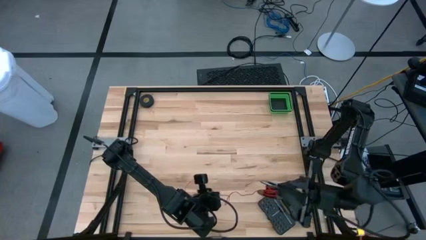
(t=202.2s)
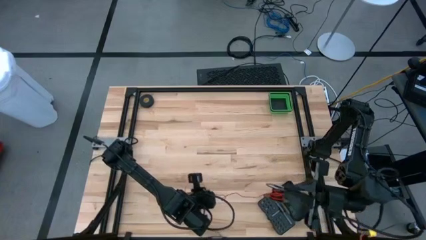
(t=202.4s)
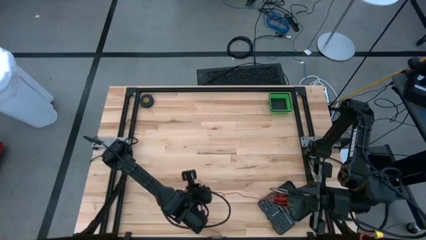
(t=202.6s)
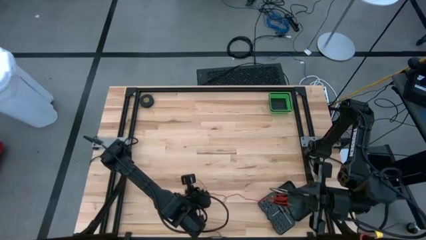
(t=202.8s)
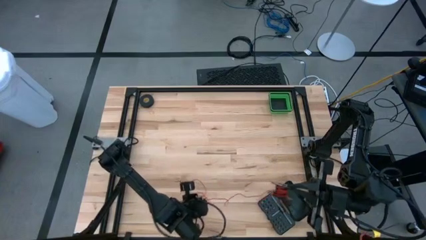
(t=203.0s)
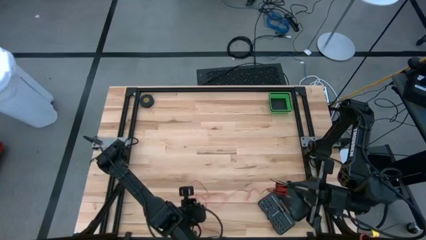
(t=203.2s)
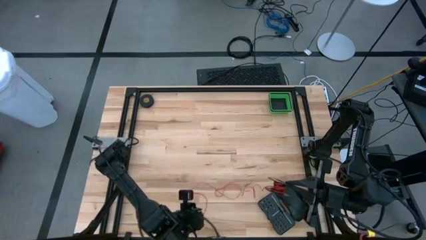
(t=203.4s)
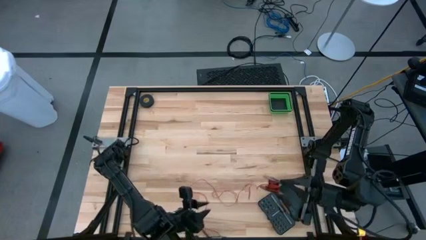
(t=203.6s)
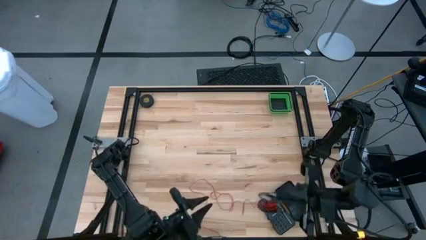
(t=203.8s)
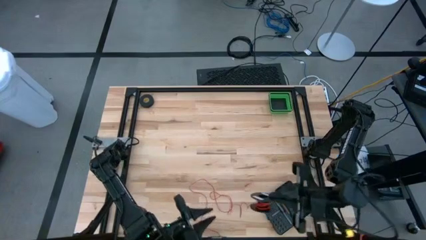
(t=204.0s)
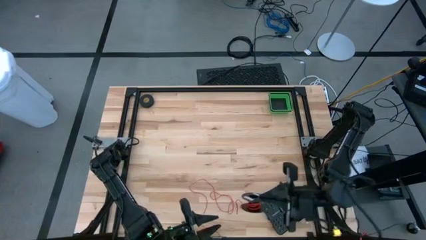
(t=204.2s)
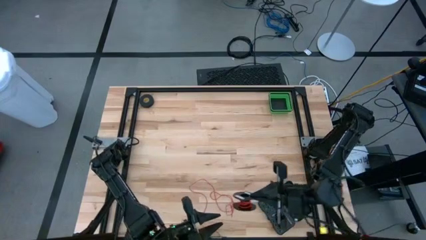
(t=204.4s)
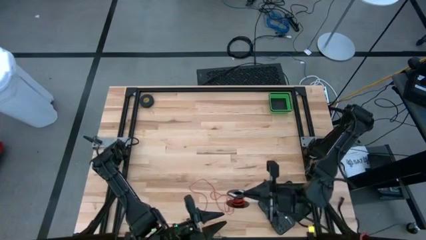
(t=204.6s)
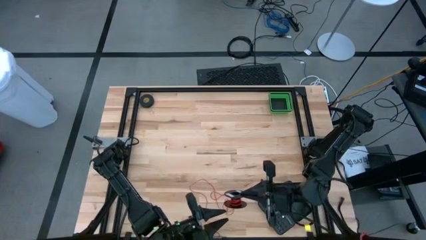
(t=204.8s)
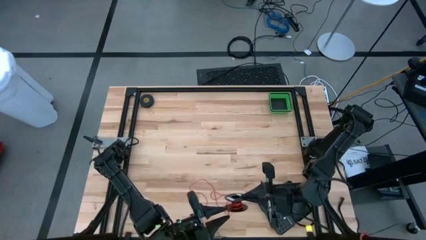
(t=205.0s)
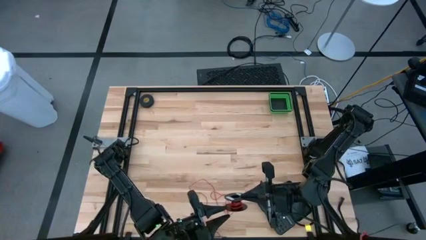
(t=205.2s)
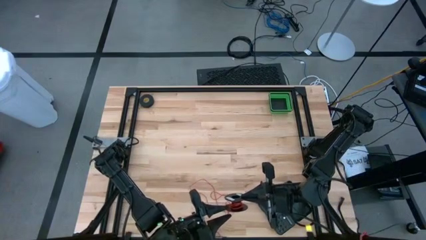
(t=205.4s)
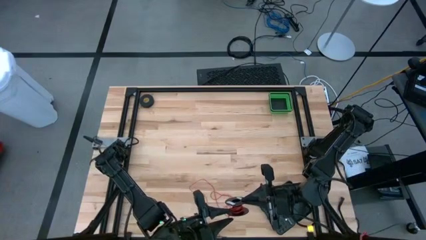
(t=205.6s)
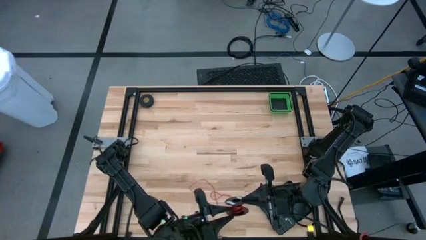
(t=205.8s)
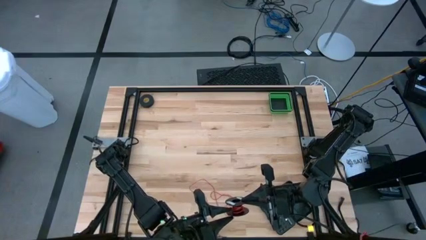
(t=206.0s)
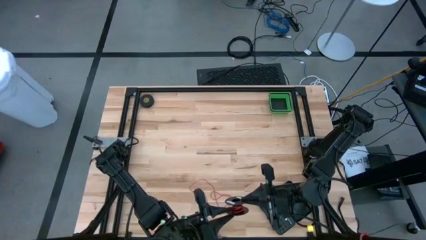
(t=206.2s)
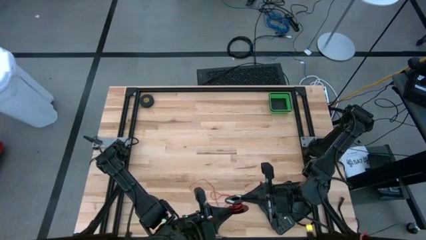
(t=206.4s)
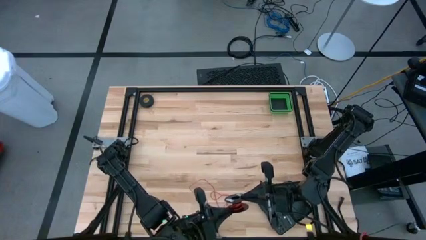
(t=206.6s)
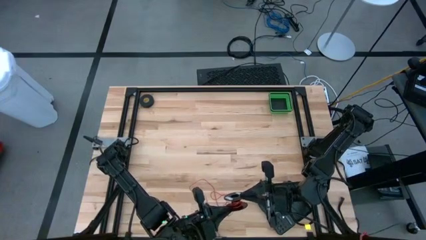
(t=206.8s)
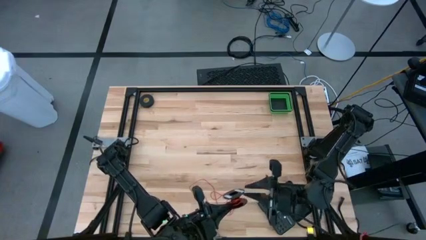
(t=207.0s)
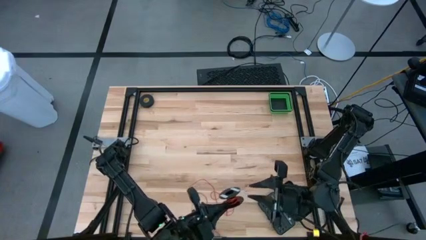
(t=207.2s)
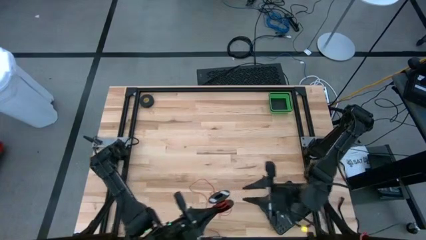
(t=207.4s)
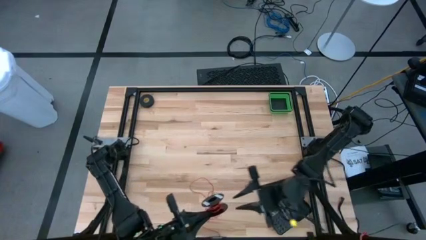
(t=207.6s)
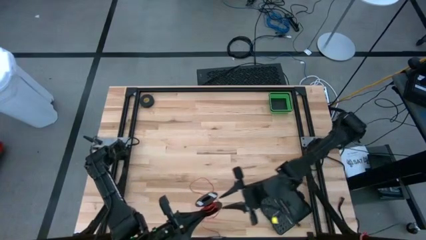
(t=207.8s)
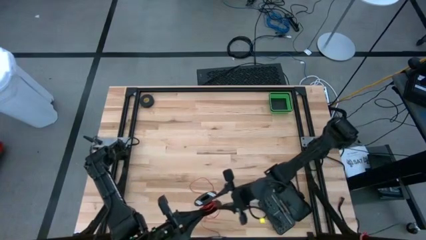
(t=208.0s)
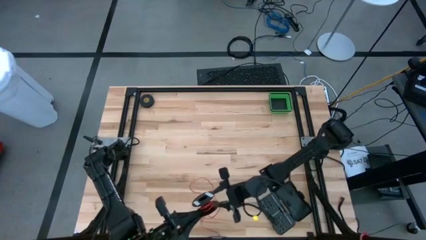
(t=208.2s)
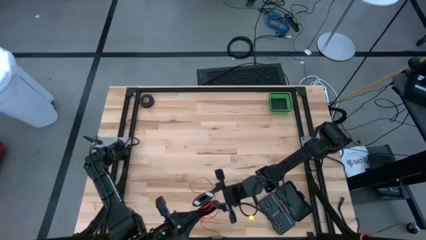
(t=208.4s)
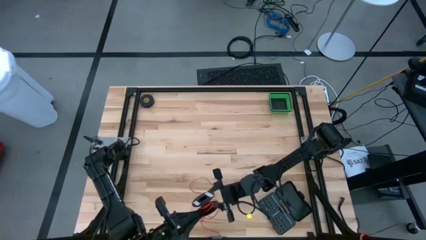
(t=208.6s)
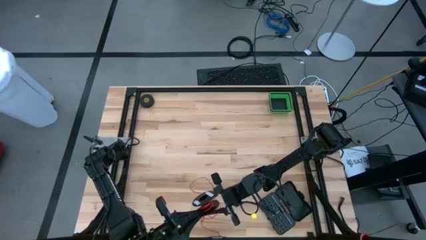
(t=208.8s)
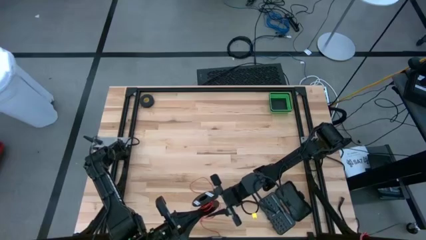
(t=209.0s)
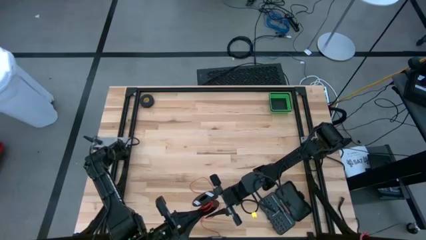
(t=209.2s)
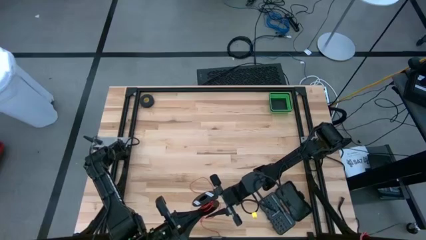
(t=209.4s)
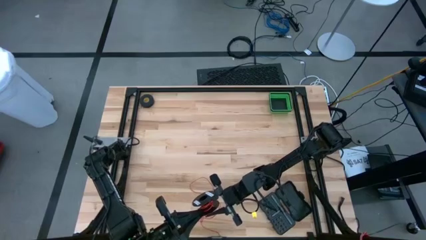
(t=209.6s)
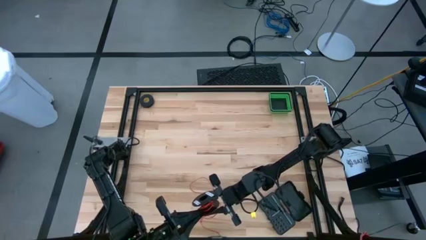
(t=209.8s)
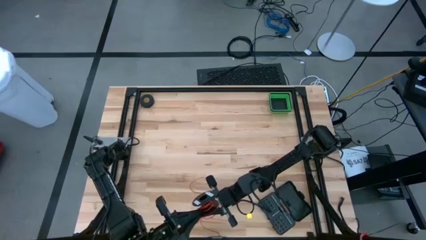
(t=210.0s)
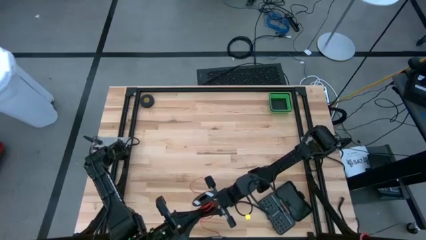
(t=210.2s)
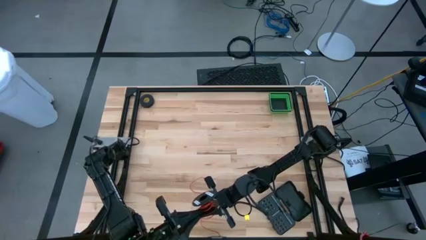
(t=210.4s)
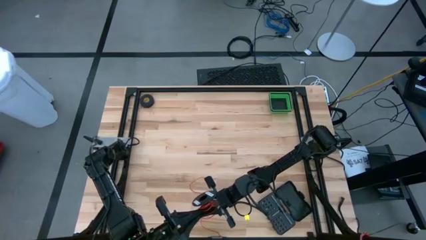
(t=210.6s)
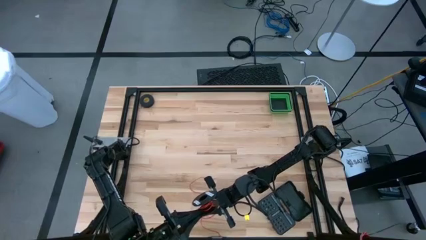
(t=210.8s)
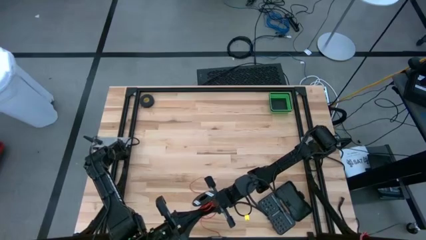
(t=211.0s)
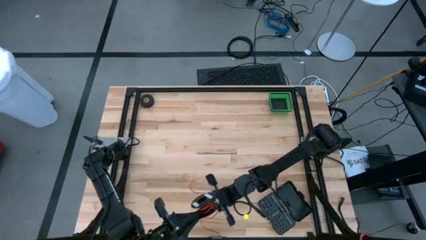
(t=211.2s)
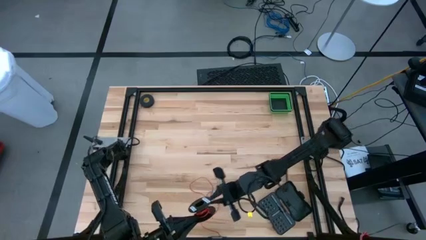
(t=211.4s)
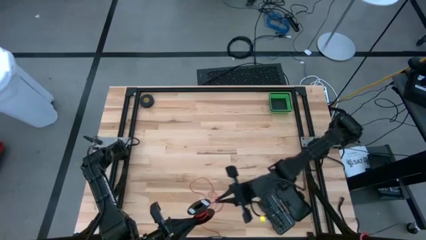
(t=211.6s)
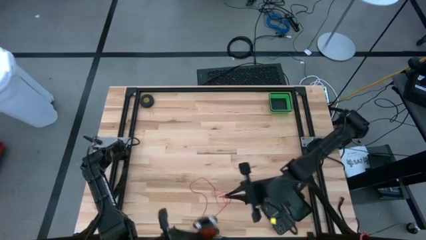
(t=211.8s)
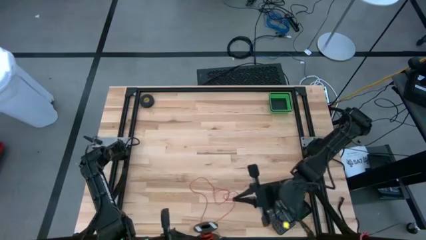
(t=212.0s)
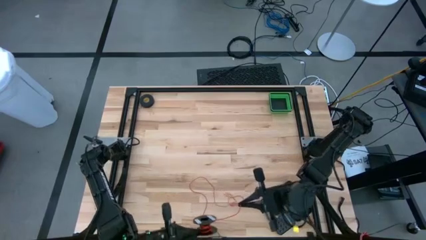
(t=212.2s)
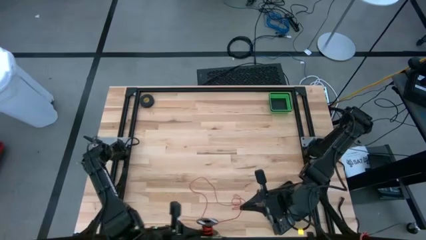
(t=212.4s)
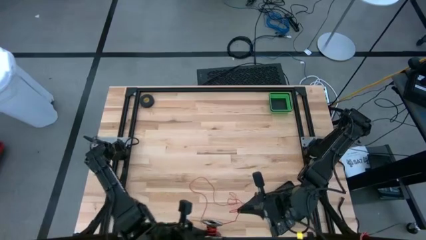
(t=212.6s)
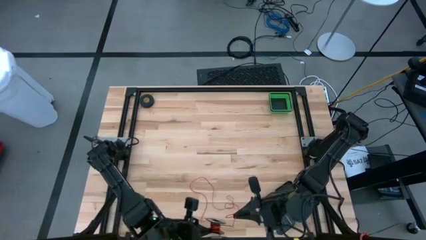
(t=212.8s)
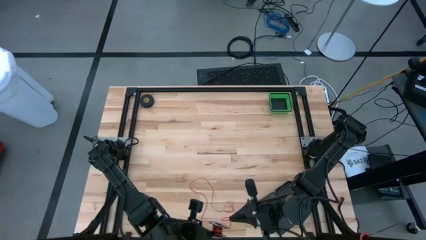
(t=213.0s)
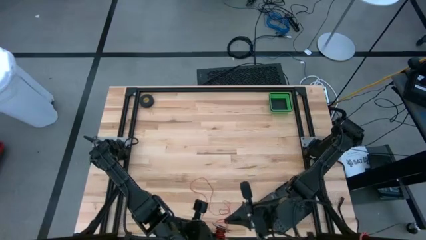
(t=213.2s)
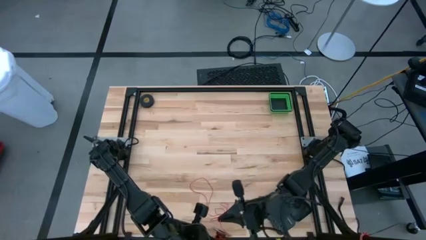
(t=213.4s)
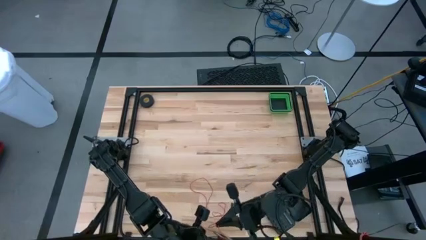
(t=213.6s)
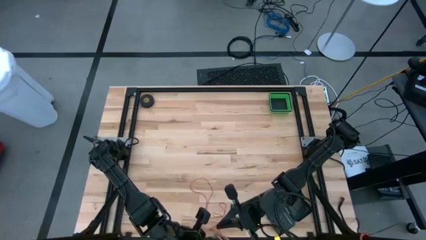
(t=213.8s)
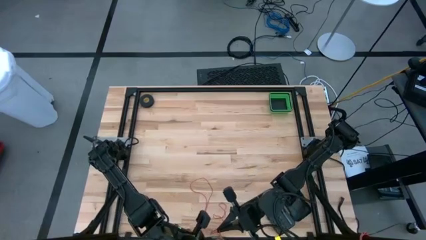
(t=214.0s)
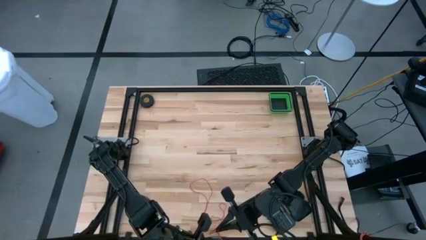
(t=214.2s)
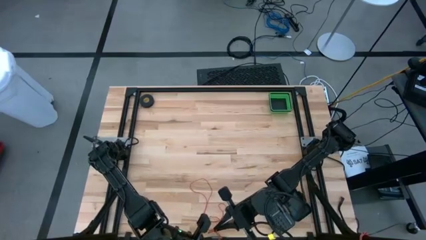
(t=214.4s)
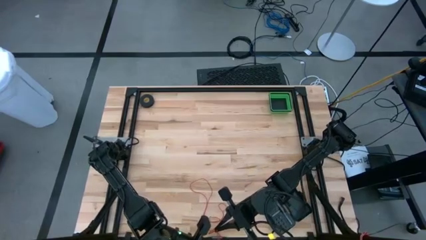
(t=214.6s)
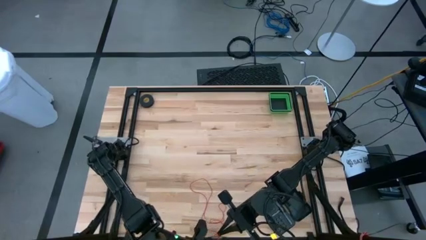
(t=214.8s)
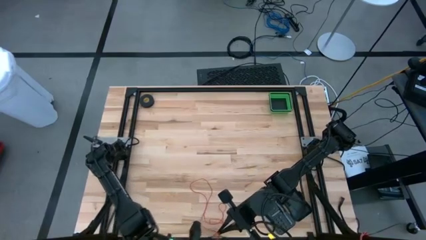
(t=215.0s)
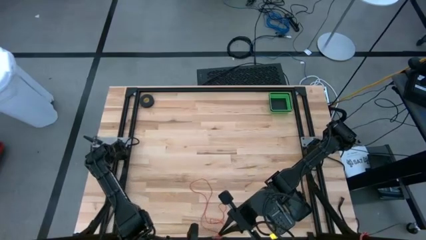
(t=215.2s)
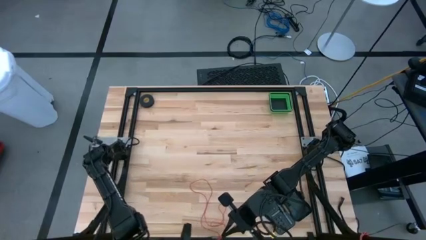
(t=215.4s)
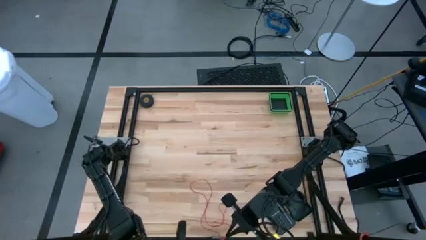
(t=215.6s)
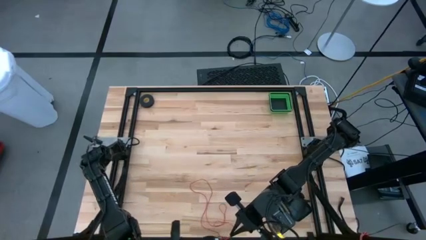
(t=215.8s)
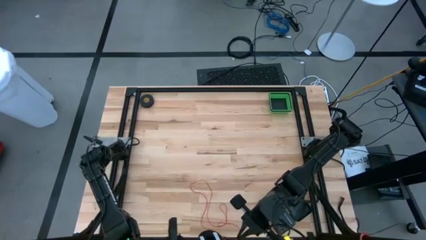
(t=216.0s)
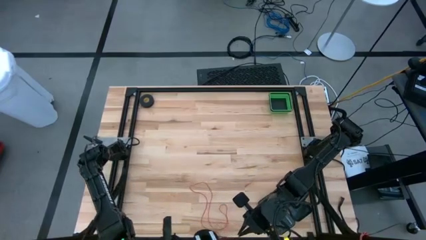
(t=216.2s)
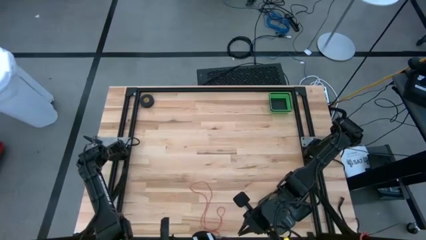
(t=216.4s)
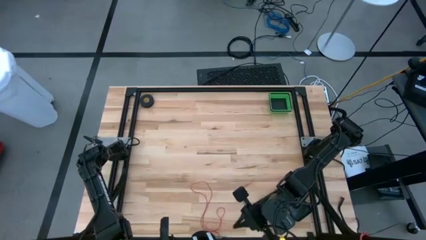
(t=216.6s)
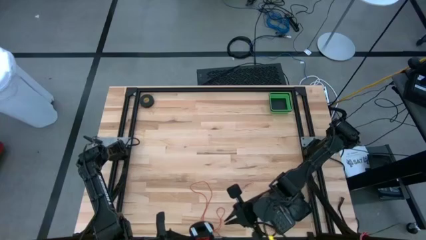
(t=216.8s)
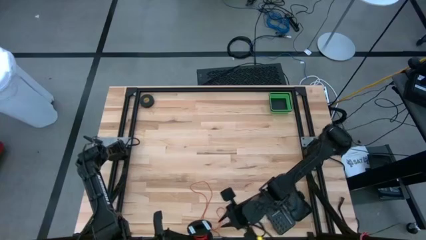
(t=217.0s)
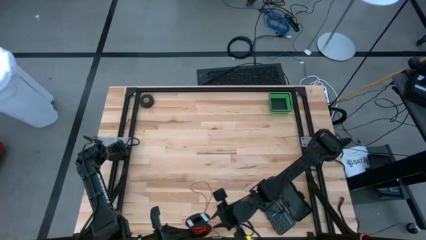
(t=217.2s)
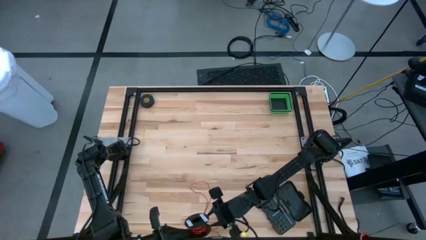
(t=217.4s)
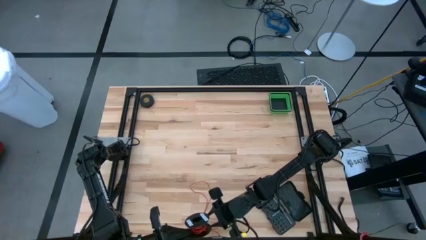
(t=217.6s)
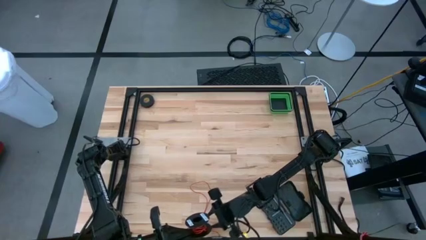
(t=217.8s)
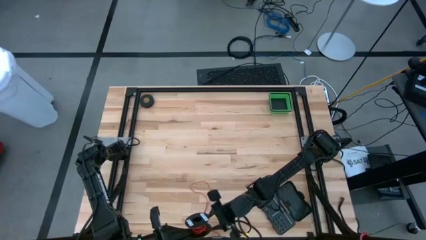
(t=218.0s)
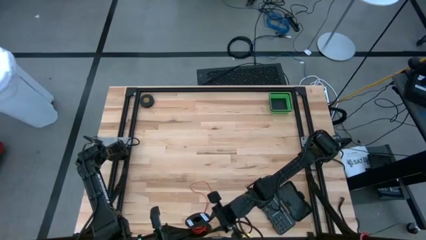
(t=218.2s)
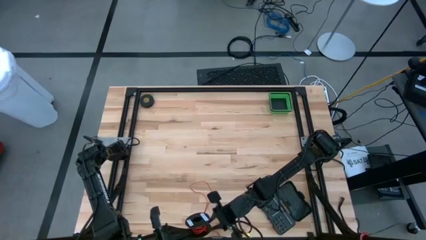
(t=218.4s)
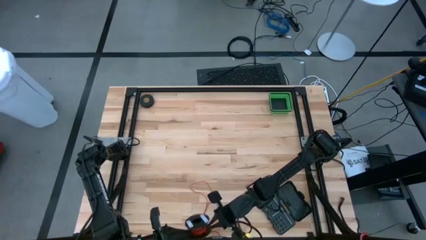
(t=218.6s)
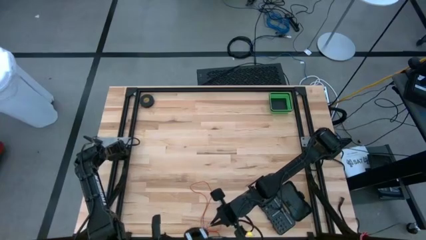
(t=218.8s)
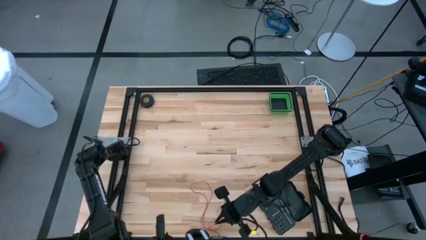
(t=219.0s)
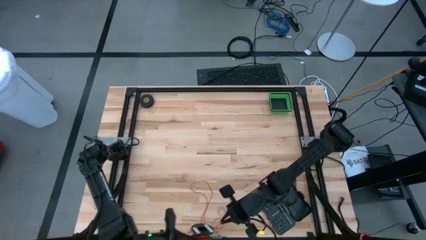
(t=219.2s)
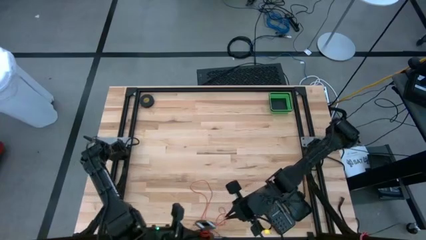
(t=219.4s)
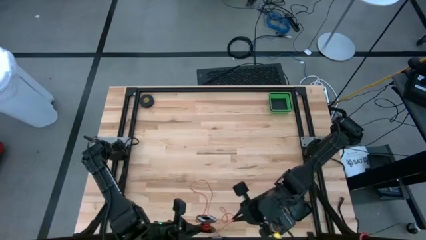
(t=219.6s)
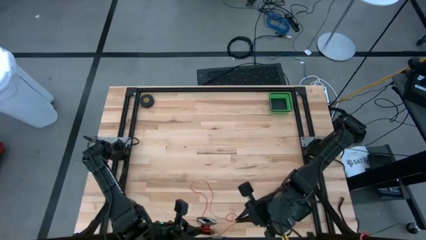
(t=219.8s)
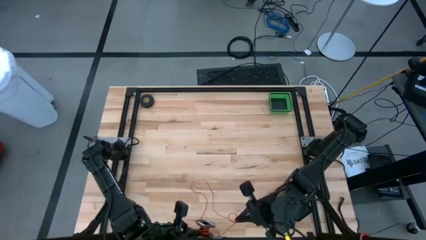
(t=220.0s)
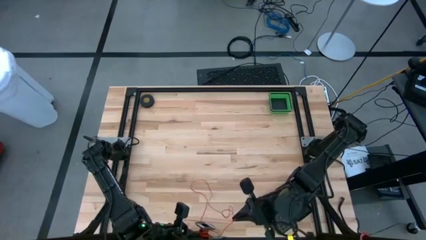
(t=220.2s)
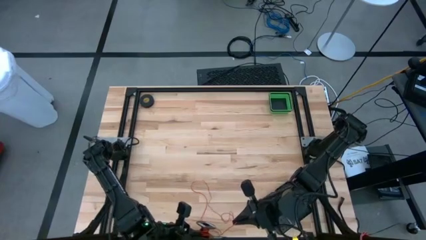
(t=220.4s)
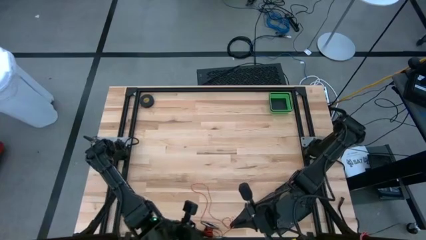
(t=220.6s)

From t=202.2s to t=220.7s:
Task: Coil cords
Coil the red wire on the black spool
